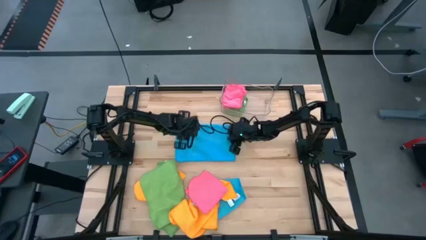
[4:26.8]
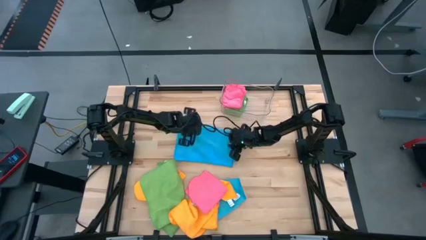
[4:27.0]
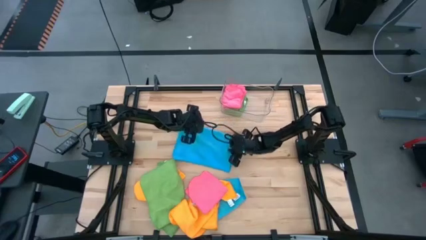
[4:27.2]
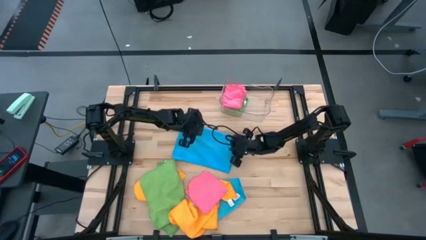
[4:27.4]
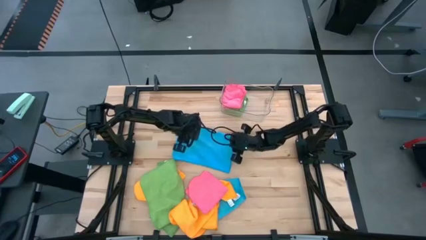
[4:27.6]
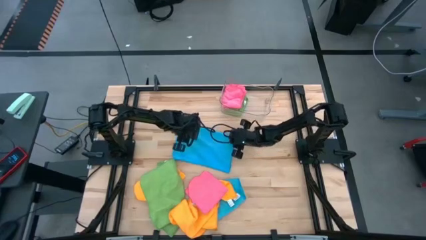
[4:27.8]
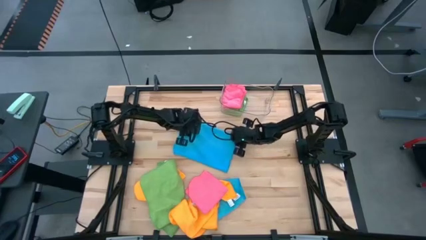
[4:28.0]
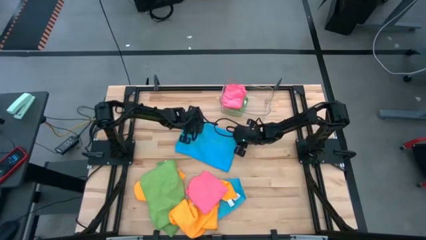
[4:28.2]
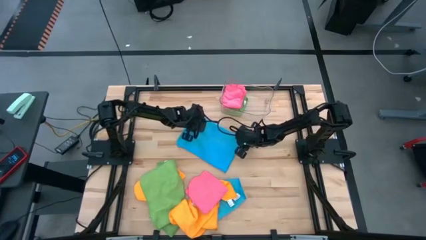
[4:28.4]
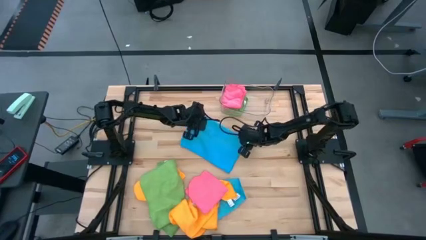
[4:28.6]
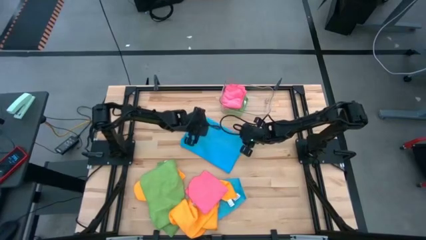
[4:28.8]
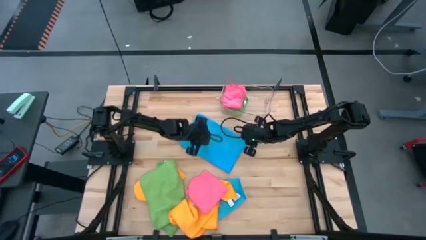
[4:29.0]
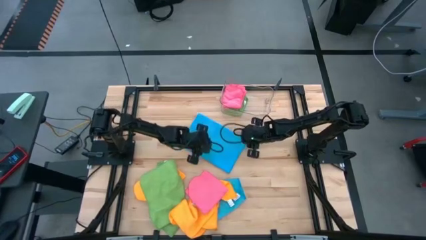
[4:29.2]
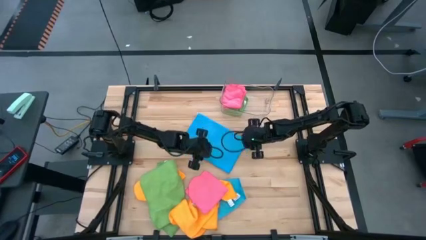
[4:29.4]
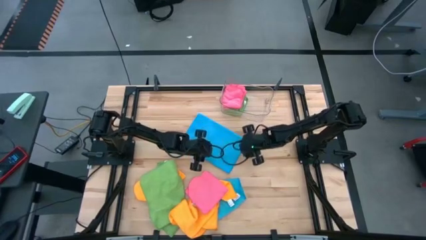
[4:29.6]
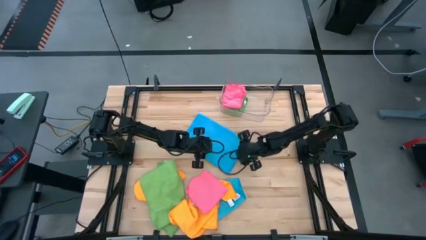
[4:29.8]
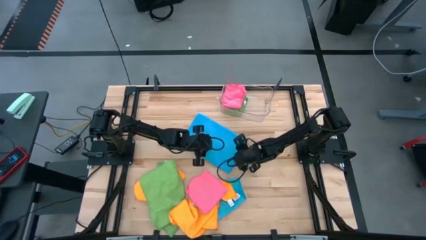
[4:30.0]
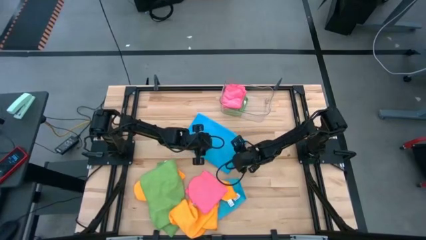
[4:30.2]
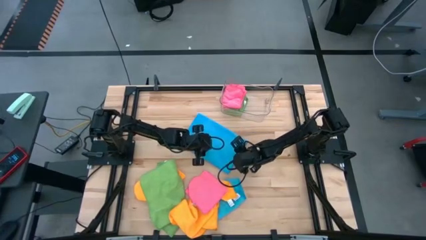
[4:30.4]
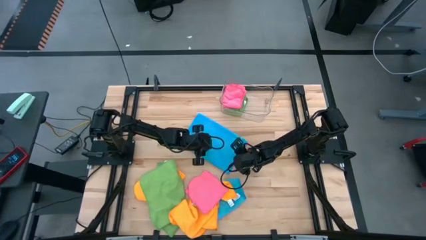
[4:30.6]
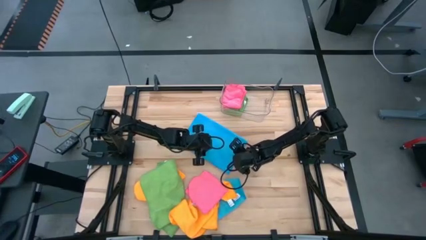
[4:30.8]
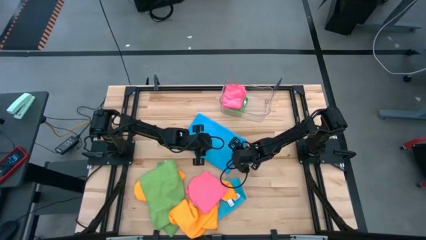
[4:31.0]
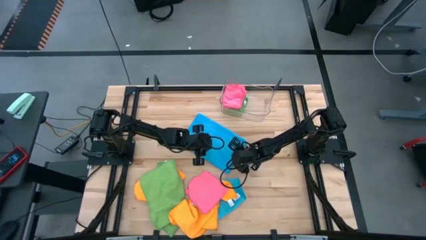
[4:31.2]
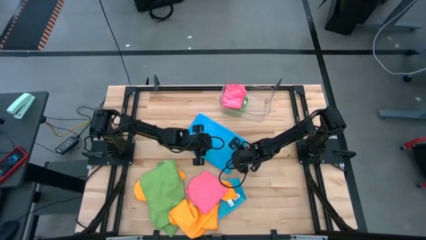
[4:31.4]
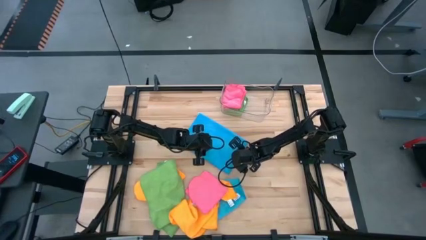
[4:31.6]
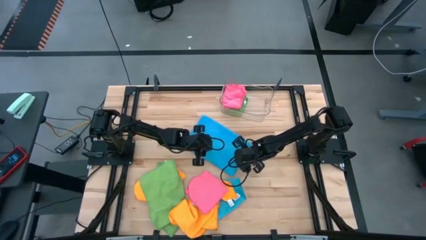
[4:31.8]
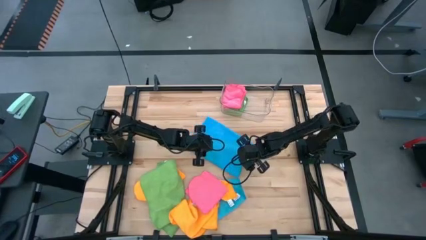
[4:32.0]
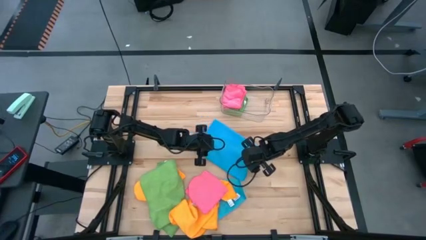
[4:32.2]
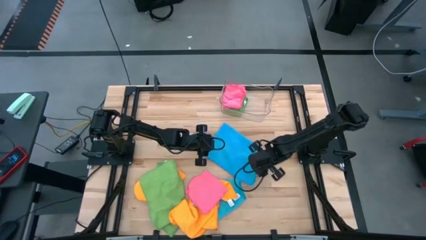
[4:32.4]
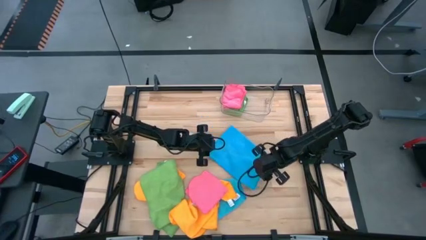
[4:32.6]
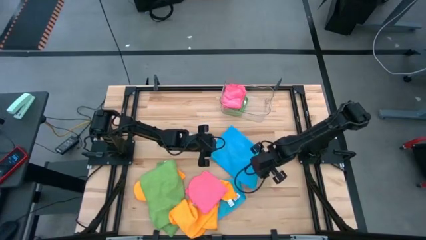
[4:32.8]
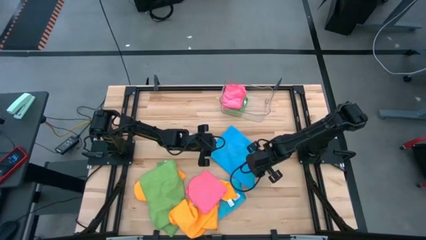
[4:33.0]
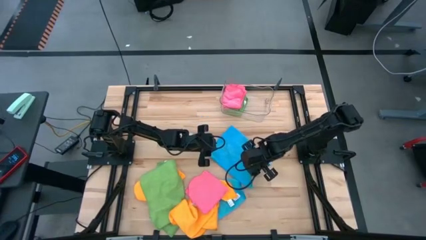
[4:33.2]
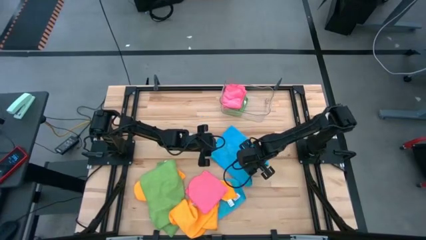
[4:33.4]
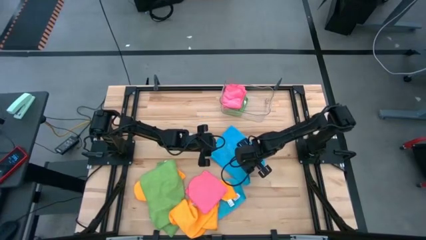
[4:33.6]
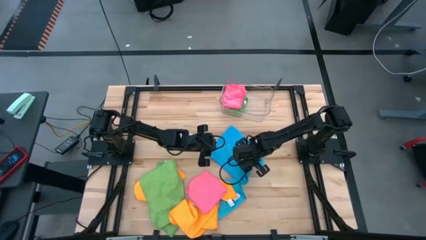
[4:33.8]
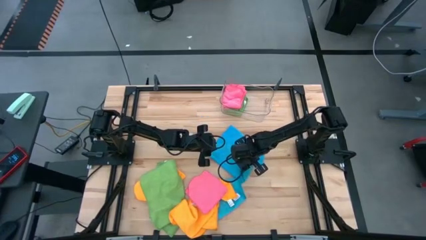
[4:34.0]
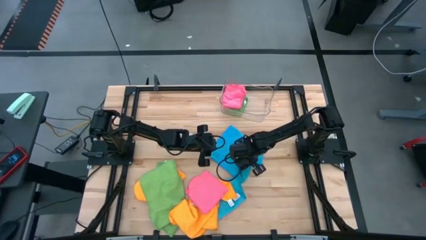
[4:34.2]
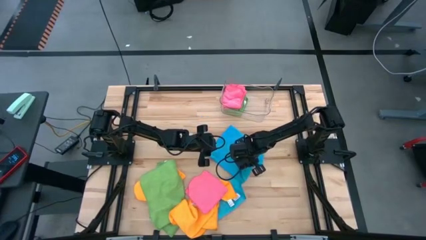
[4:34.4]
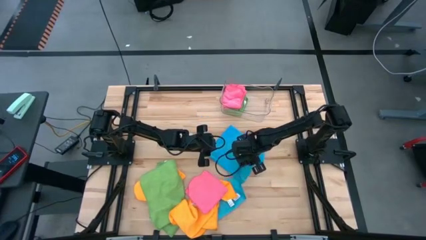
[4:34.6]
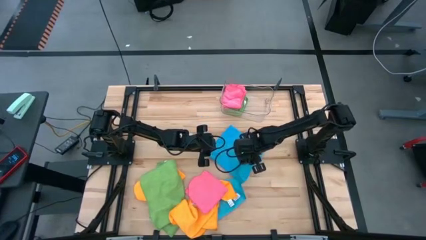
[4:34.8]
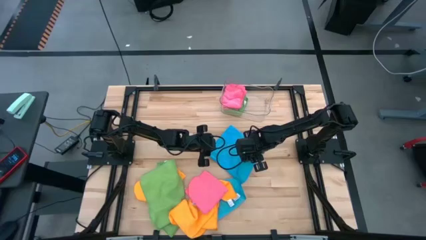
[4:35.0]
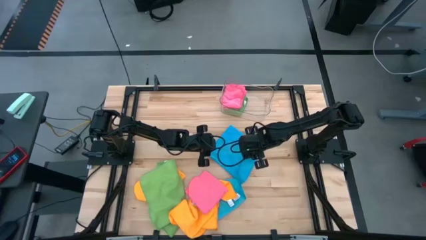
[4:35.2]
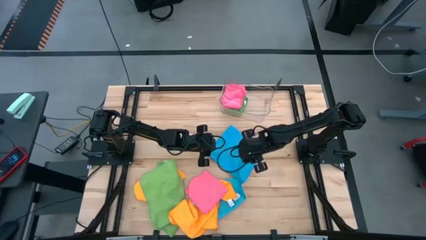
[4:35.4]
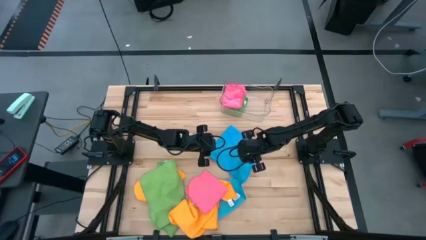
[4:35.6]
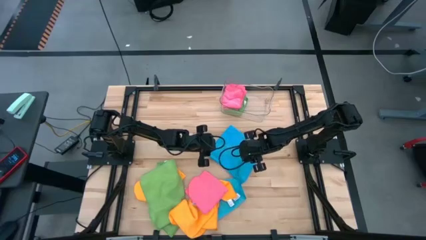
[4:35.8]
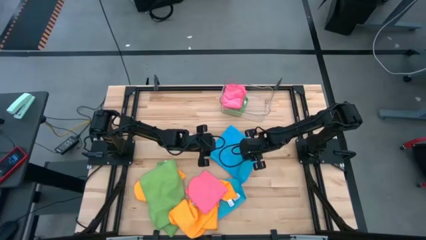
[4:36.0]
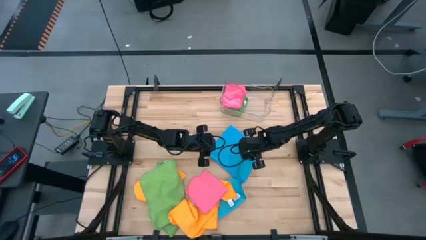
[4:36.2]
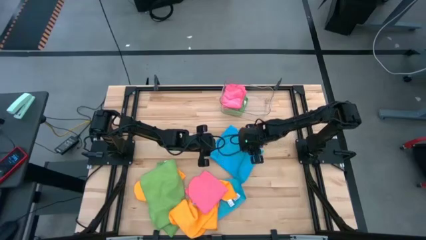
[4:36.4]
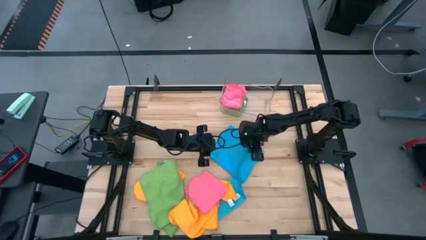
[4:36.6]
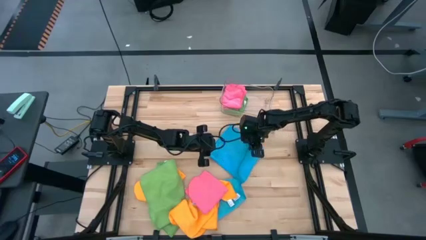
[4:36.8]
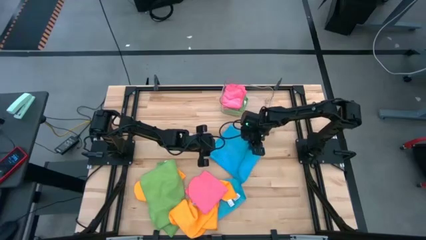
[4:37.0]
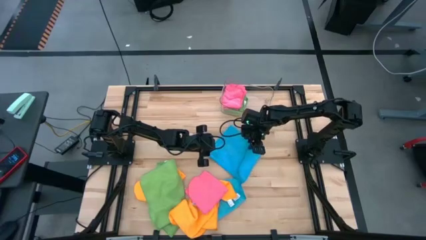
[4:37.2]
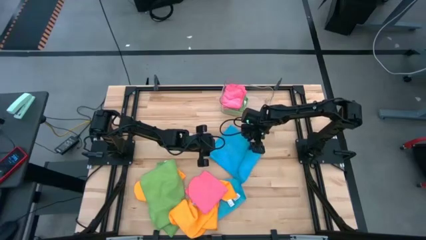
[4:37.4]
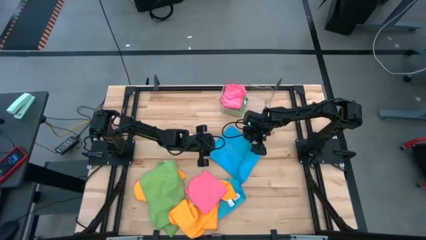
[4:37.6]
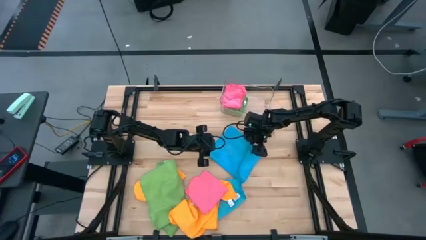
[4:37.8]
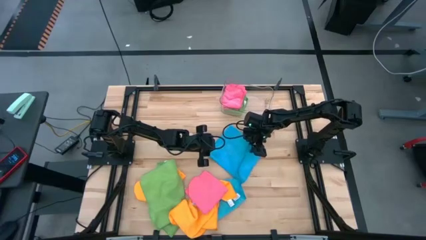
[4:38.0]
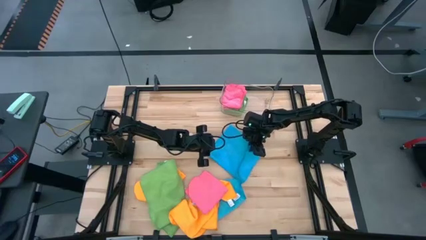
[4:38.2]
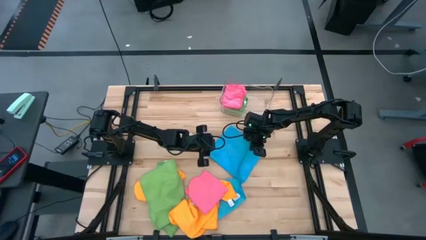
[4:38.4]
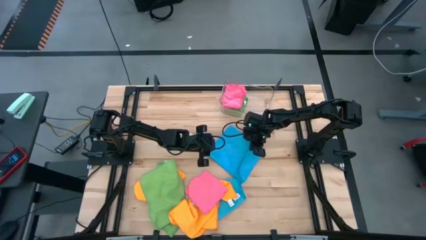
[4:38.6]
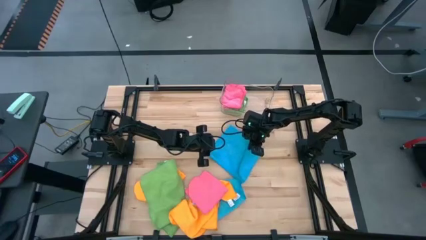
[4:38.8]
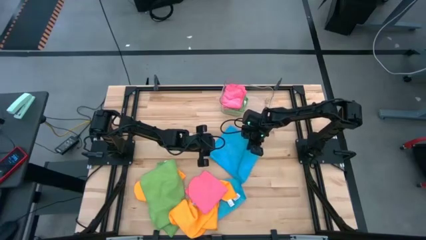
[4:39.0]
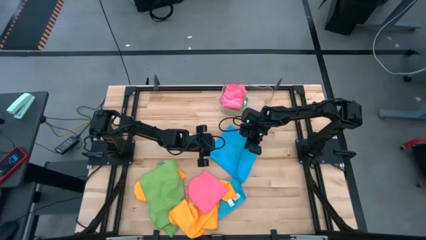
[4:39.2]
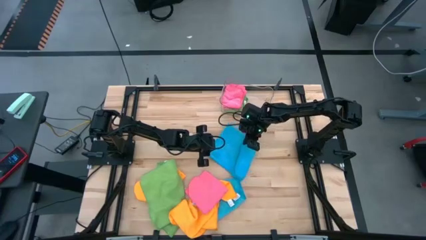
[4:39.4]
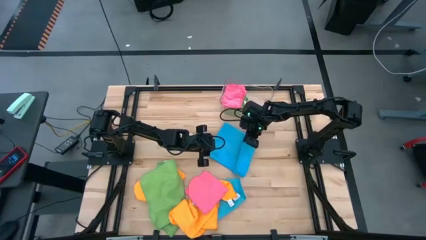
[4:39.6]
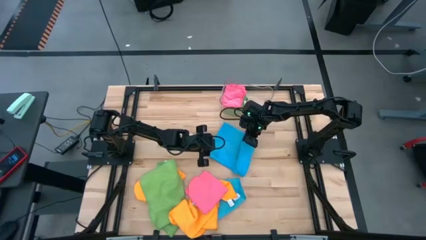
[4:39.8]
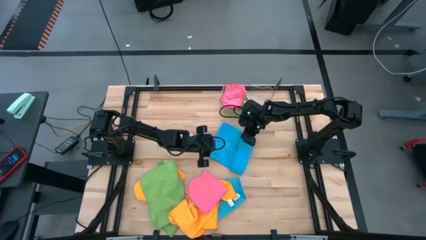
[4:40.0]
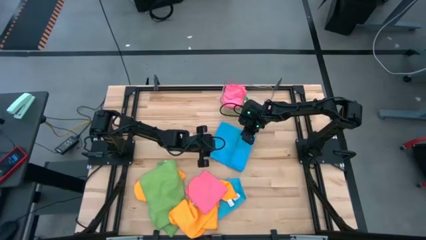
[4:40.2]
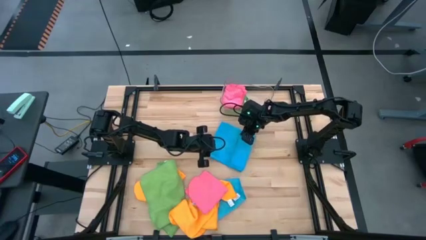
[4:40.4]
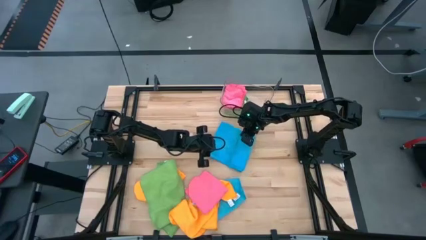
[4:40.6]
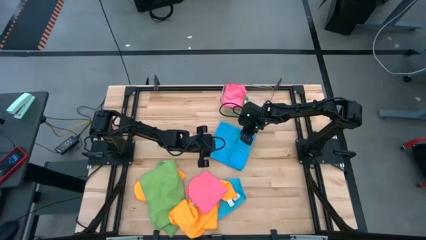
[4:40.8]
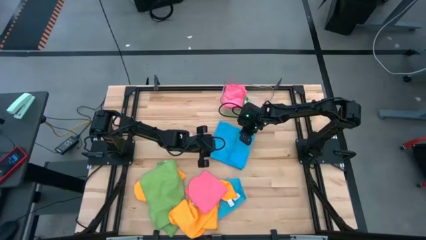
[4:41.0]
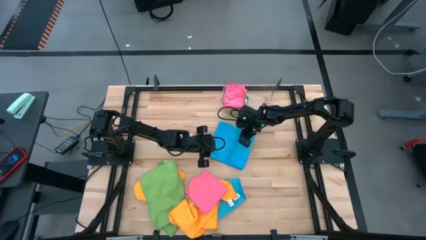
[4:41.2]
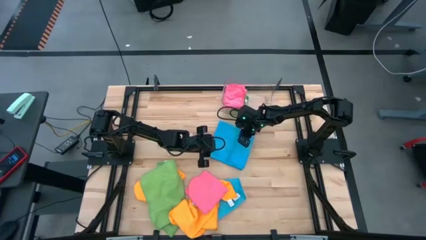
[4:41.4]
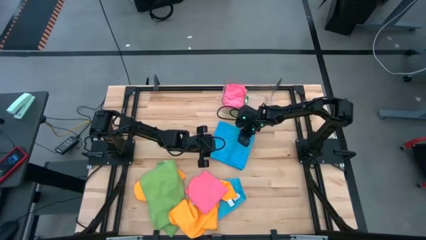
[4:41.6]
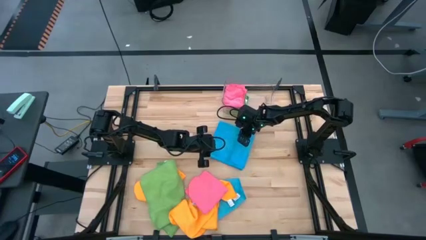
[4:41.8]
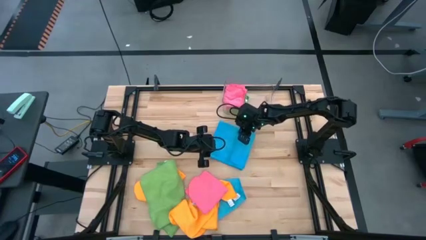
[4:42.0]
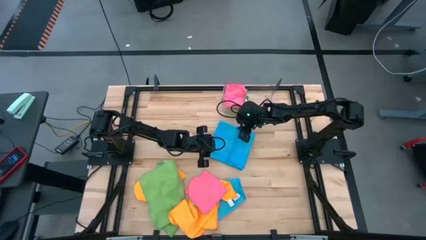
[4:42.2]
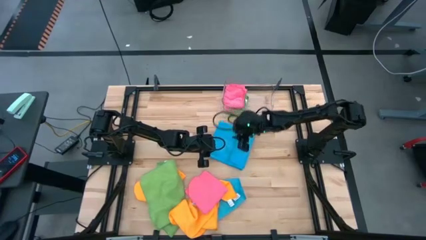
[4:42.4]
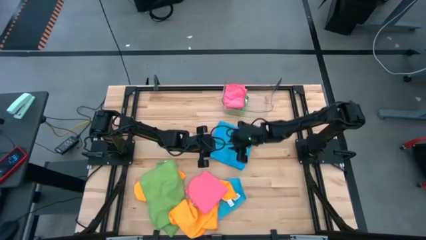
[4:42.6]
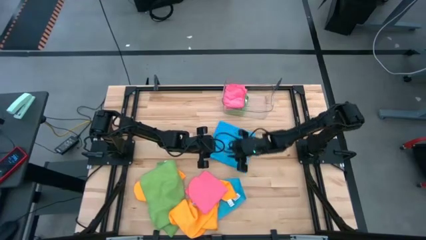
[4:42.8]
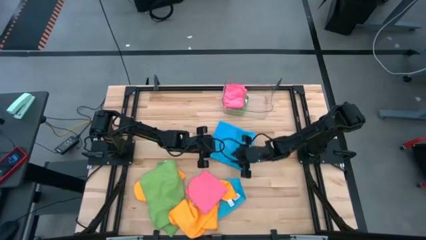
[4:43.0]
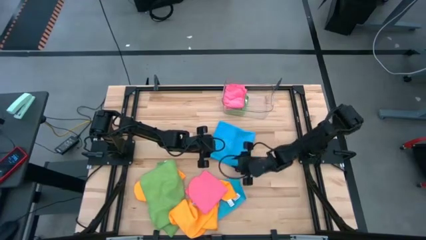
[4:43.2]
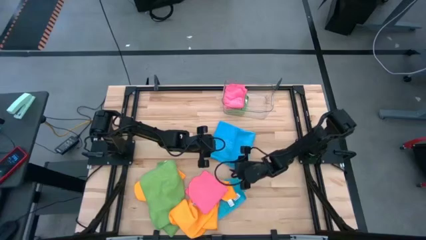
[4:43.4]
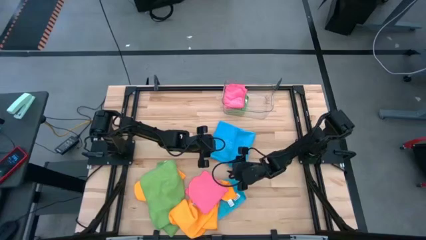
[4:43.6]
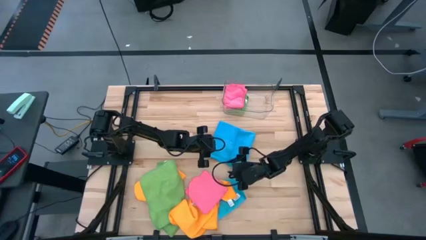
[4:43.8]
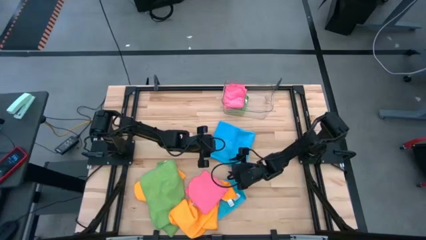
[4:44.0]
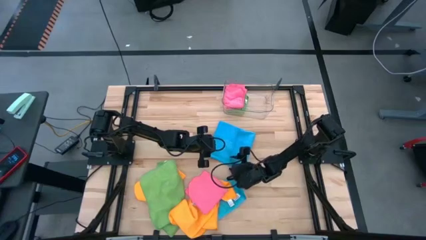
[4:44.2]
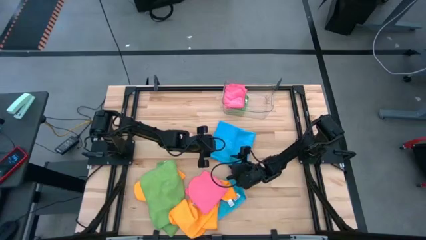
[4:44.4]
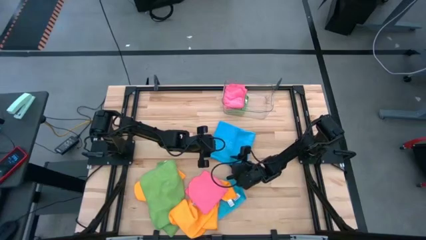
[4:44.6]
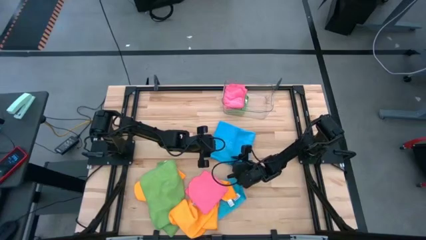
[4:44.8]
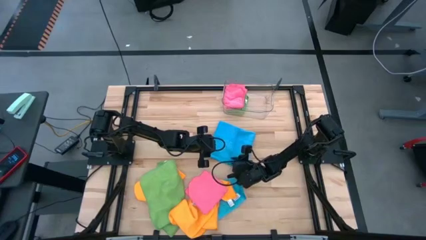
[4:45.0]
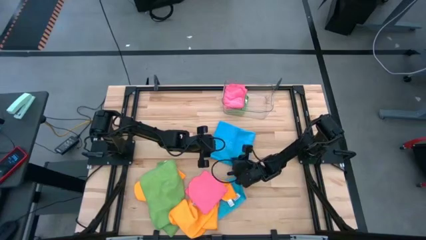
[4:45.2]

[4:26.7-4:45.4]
Task: Fold microfiber towels
Fold the top blue towel
